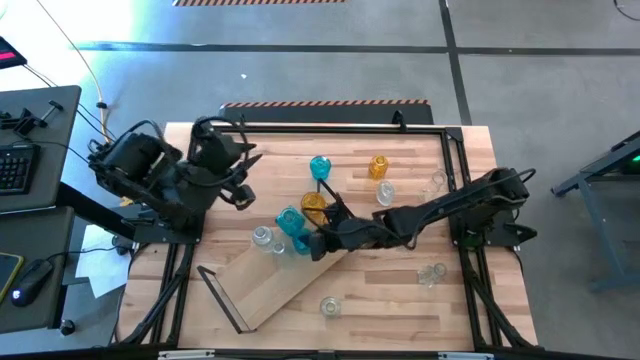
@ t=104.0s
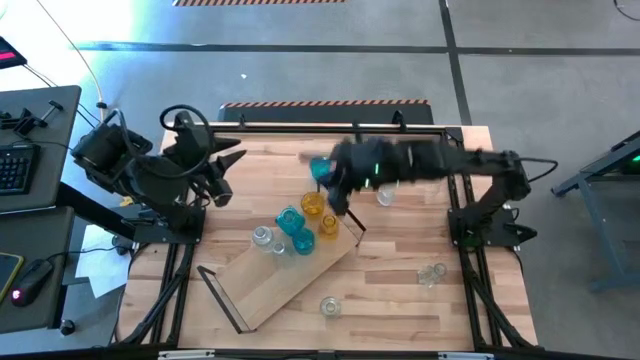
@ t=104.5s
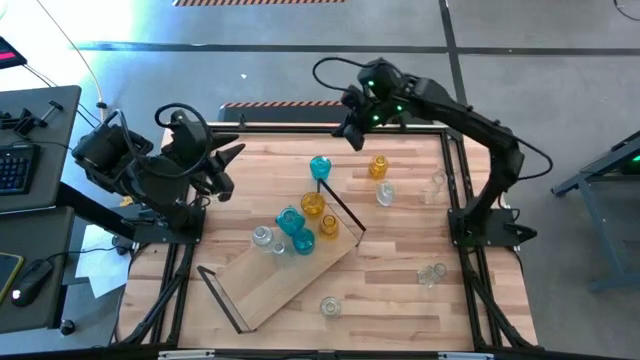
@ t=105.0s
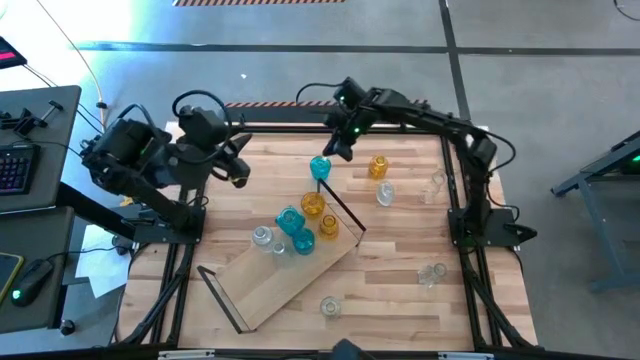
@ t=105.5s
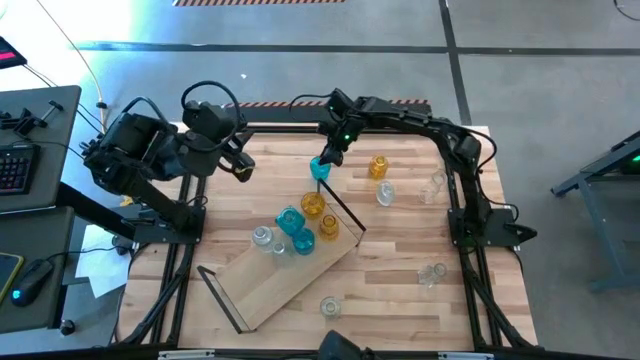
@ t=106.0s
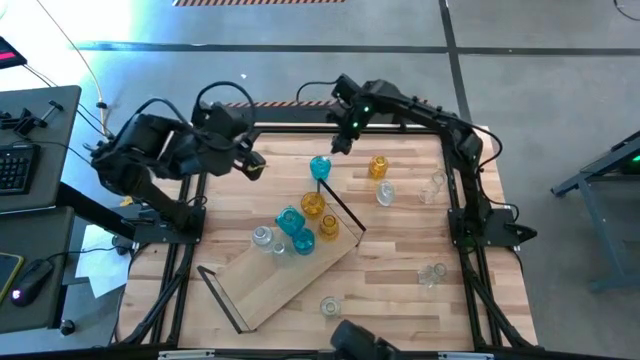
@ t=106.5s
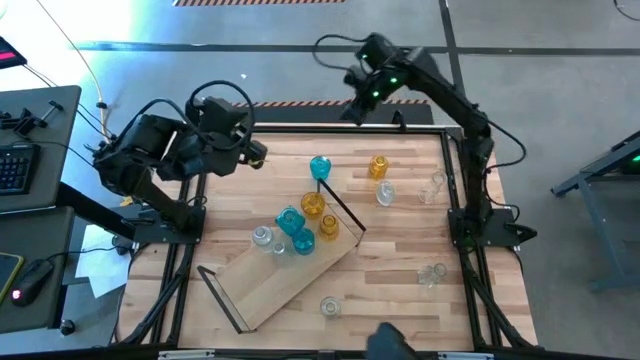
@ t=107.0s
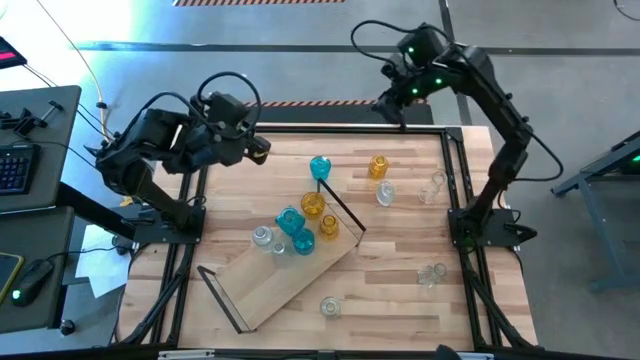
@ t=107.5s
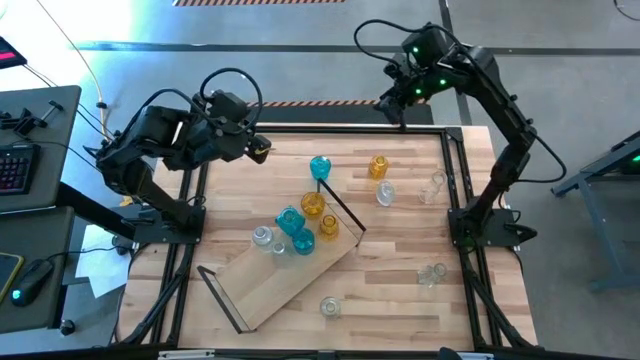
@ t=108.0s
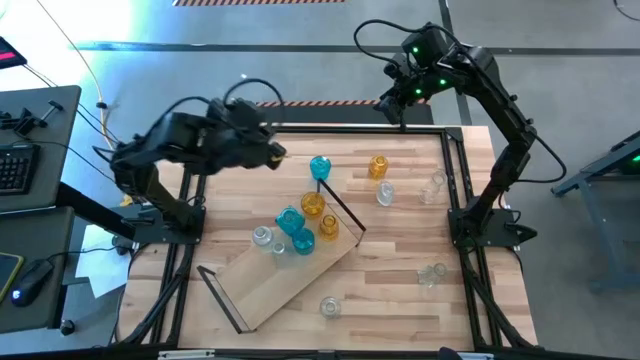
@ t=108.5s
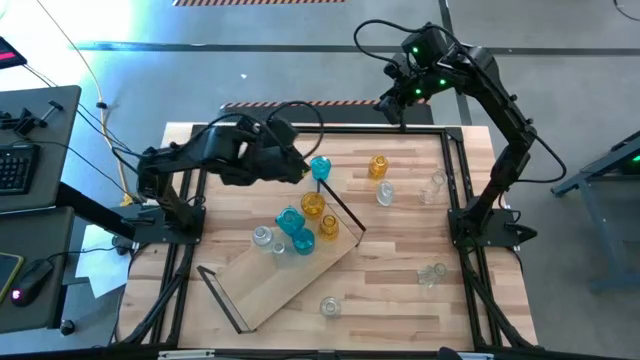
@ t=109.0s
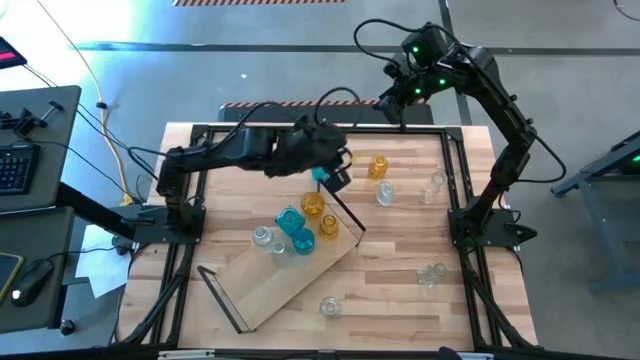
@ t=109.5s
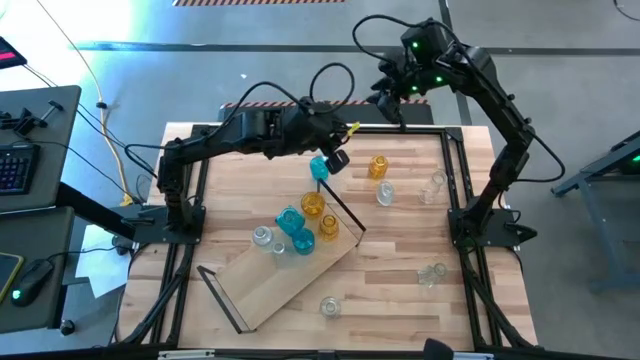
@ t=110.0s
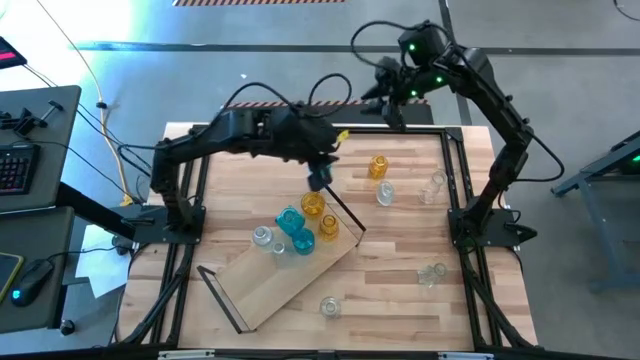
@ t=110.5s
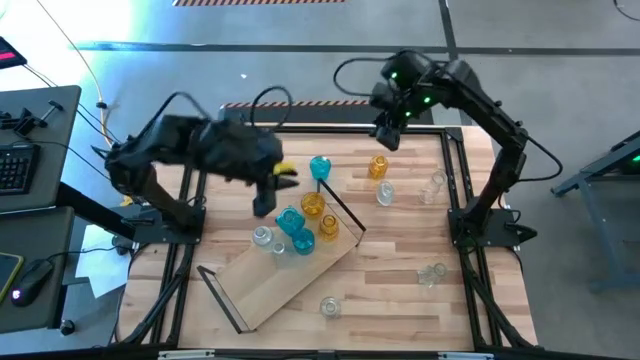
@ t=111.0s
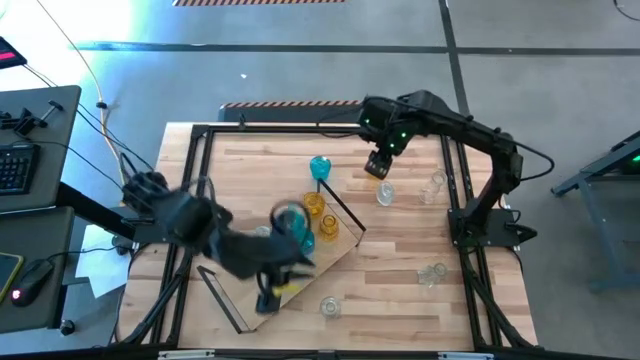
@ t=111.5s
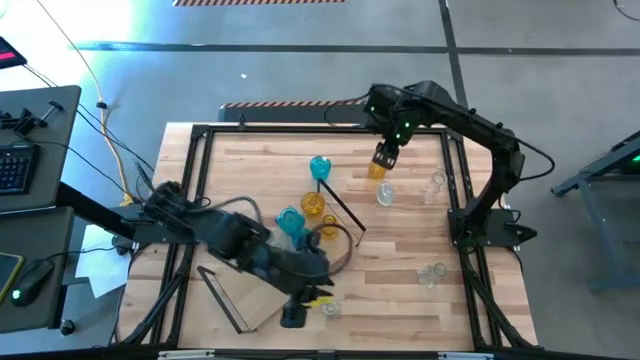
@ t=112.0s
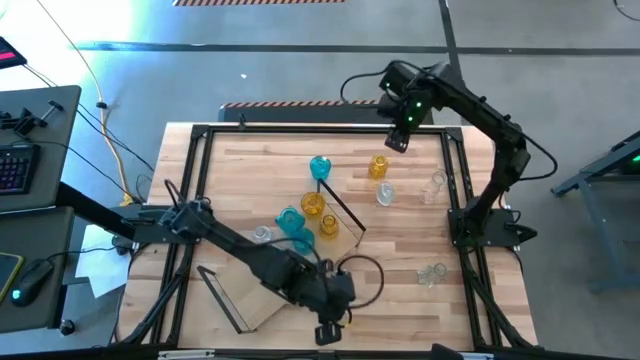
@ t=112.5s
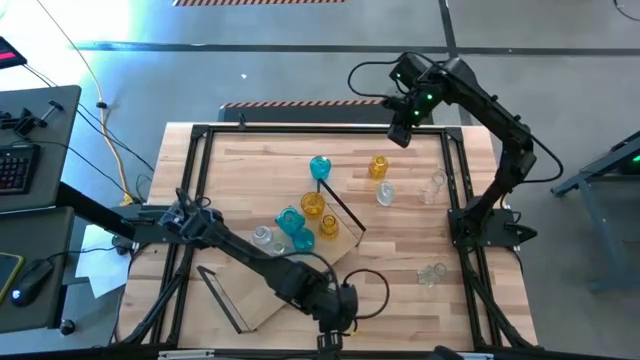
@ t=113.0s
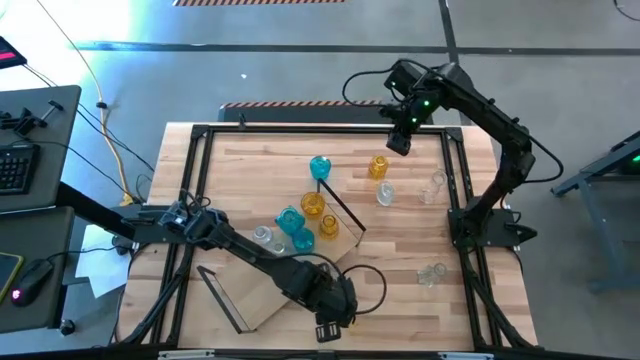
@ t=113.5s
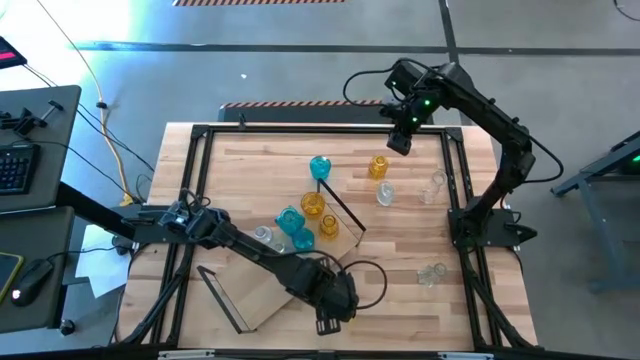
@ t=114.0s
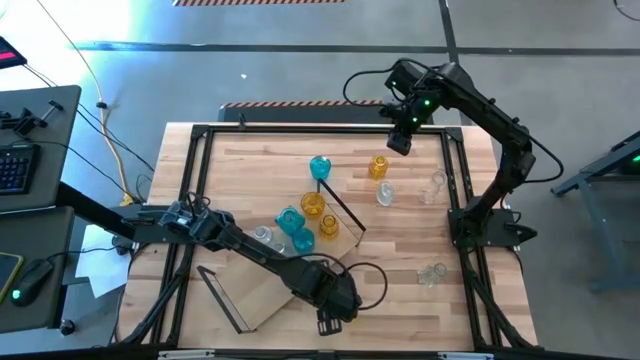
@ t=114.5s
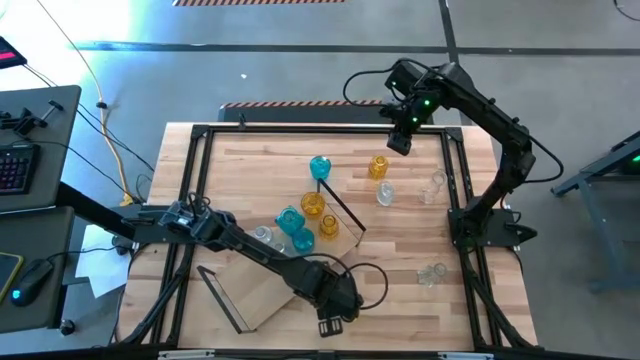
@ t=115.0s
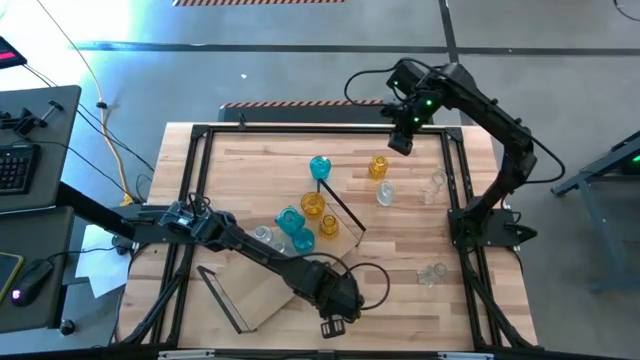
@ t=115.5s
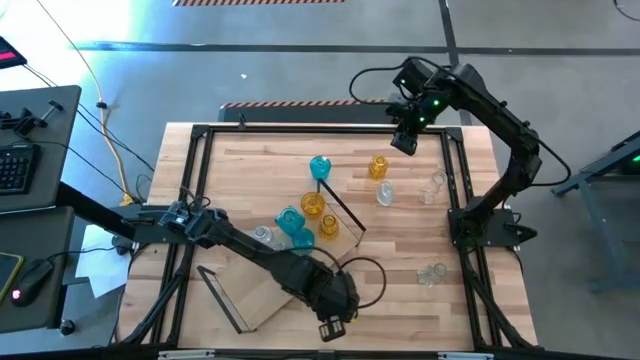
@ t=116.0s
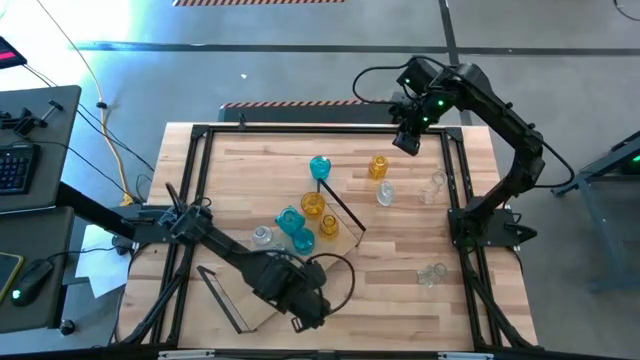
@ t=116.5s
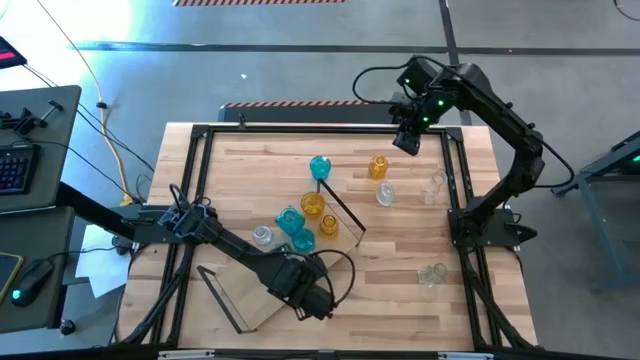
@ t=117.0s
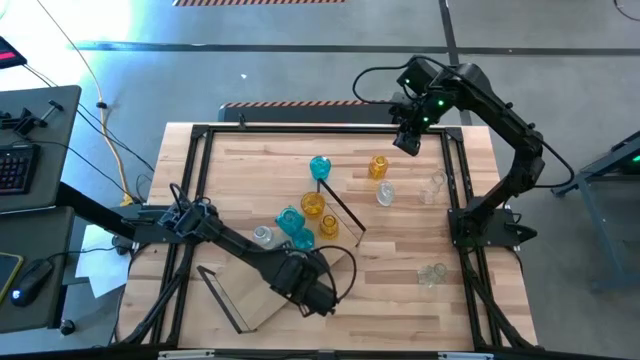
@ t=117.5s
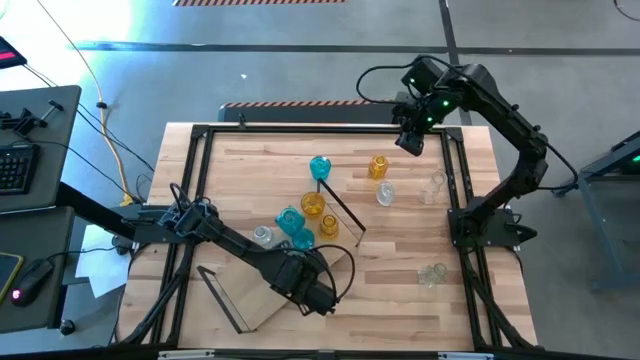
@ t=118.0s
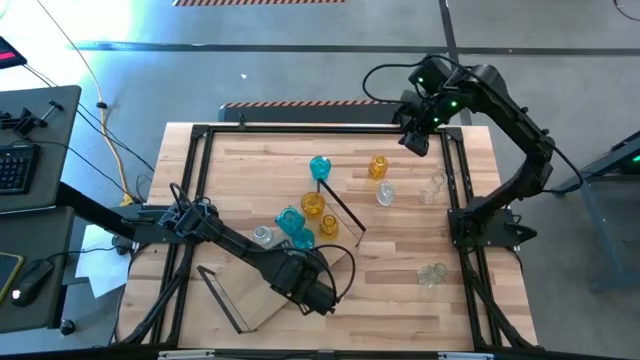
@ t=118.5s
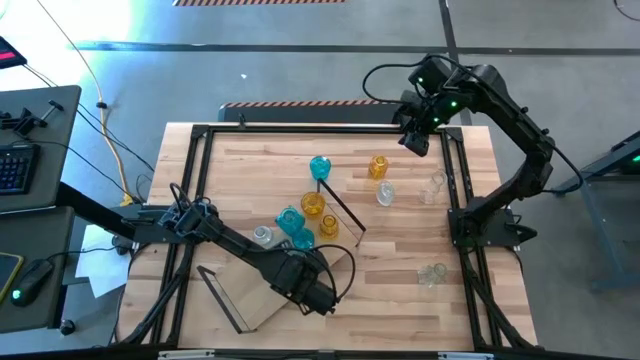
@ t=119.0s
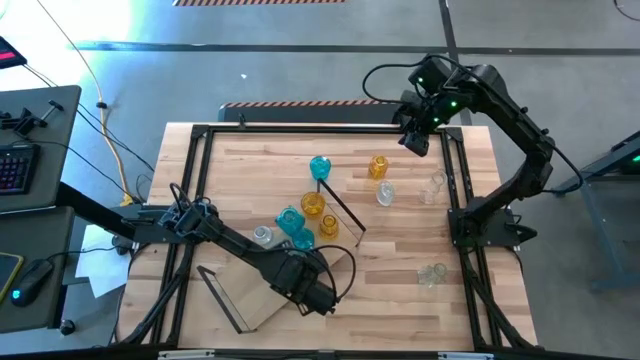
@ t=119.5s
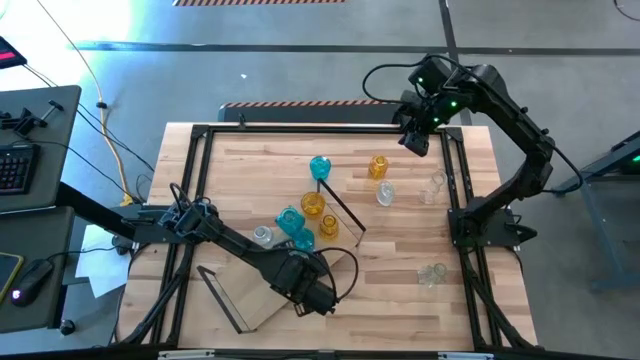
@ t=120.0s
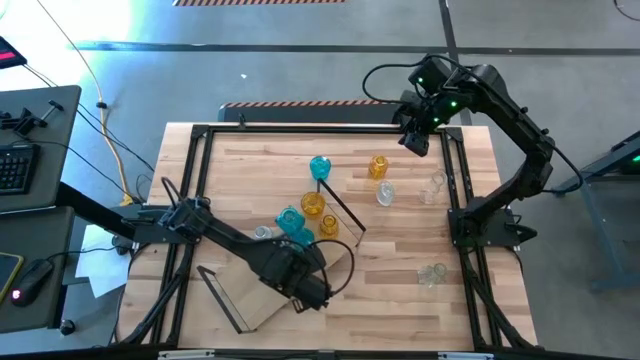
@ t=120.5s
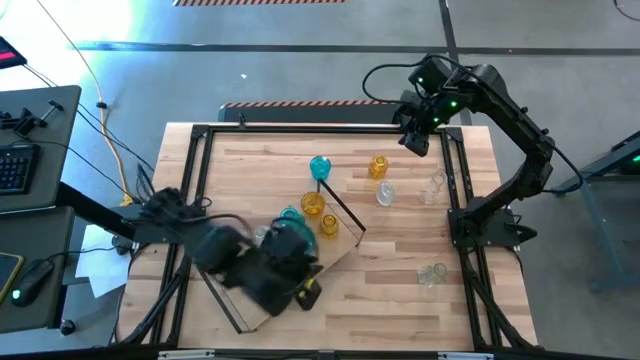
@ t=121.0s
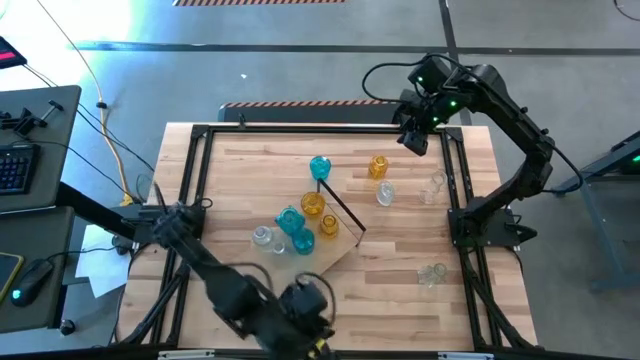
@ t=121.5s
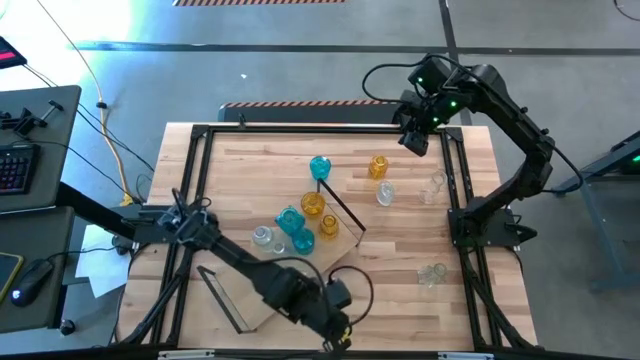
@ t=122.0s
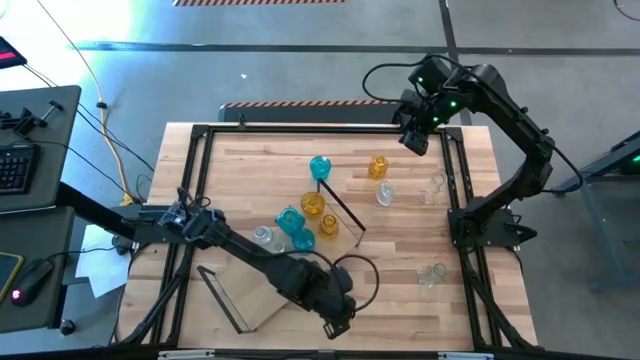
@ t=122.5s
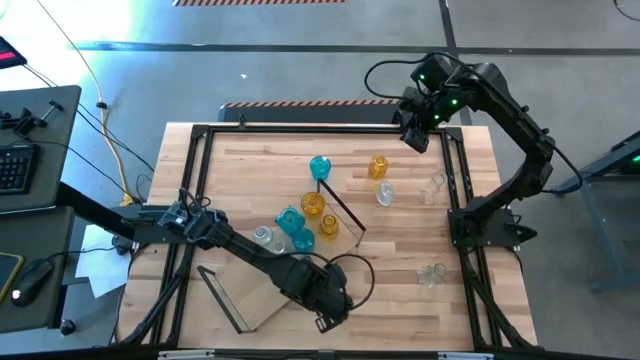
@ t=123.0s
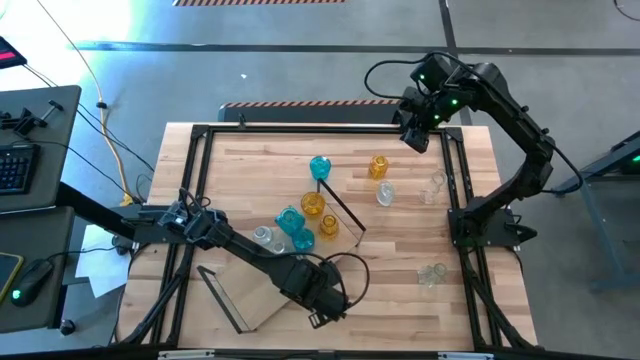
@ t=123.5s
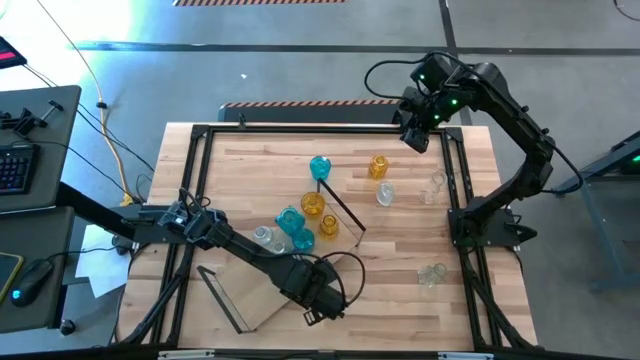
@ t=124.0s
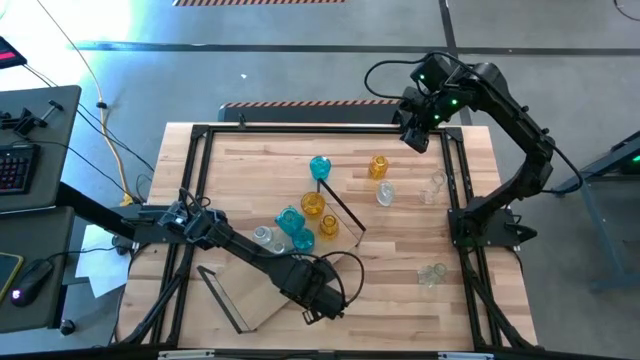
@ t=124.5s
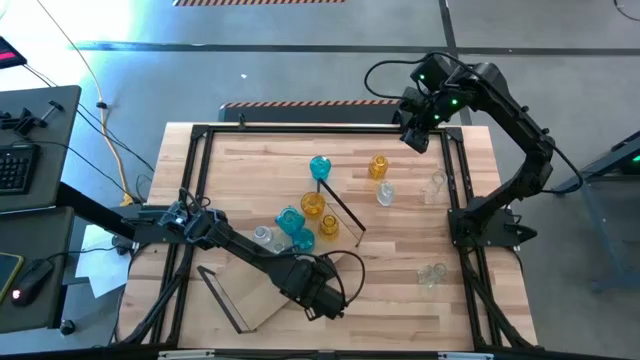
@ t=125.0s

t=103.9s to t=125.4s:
Task: sort vases onto shelf
Put the transparent vase on the shelf aligned with the other transparent vases

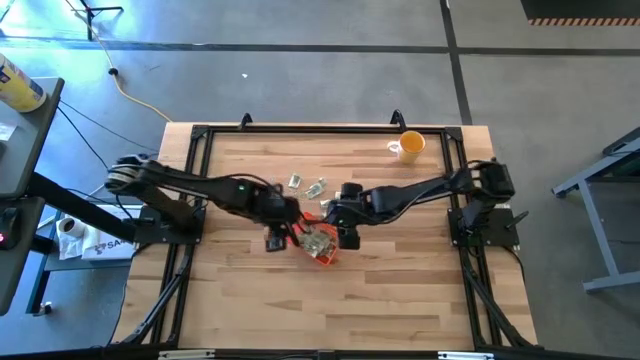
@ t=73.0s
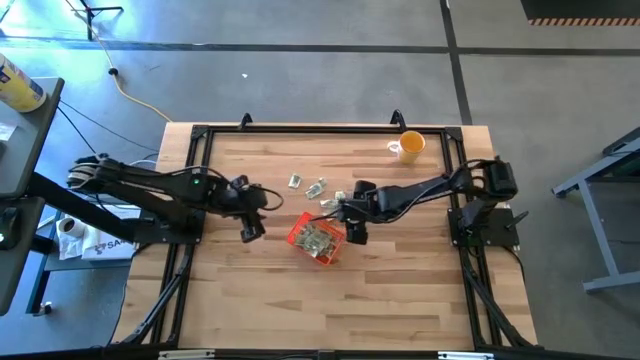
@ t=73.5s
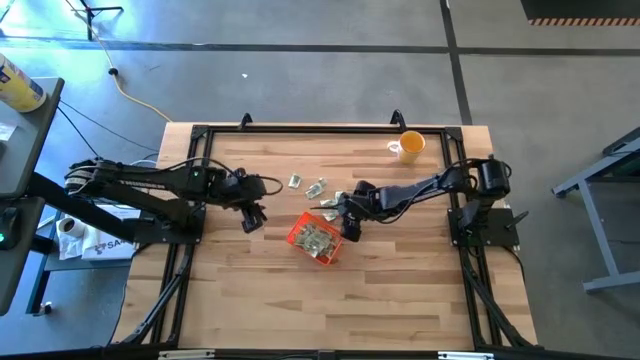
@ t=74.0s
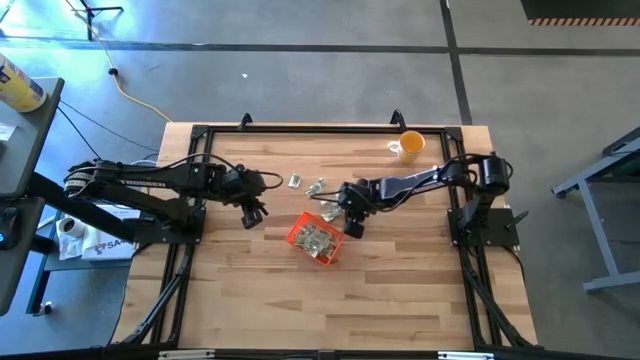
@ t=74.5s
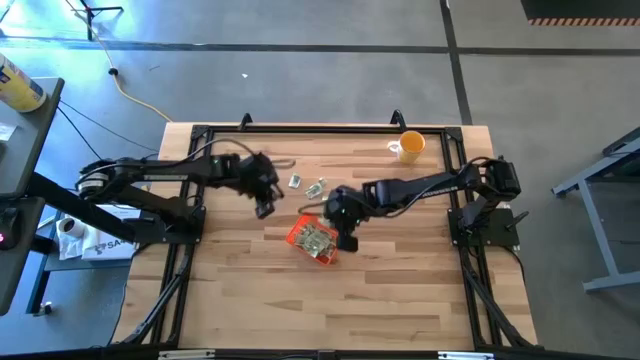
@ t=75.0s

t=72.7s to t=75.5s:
Task: Pick and place Stevia / Truvia into bins
Put the stevia packet into the orange bin
